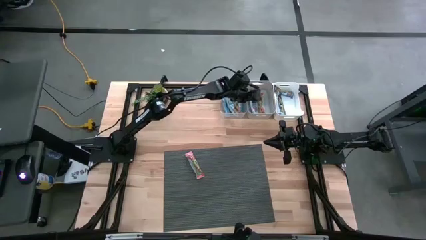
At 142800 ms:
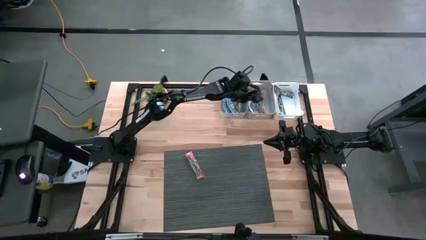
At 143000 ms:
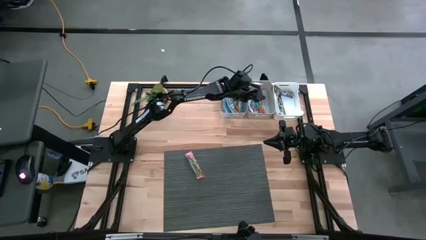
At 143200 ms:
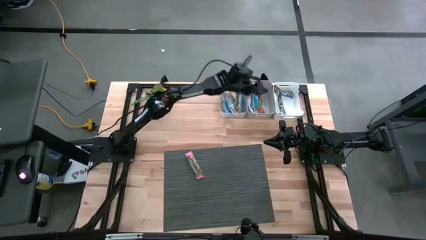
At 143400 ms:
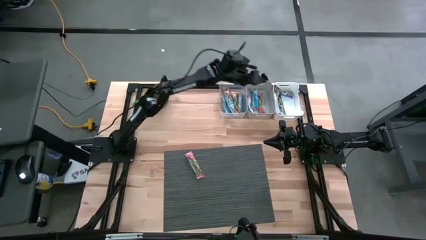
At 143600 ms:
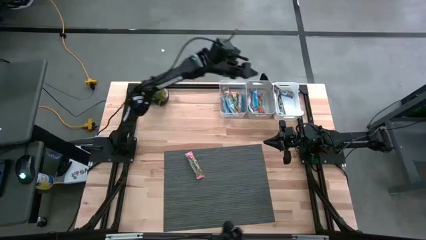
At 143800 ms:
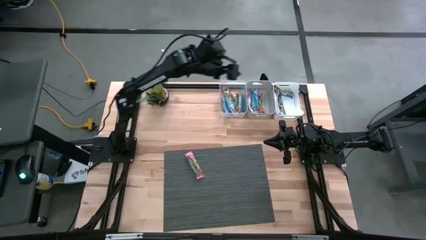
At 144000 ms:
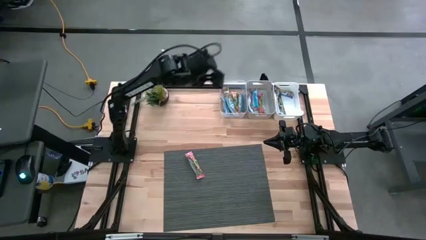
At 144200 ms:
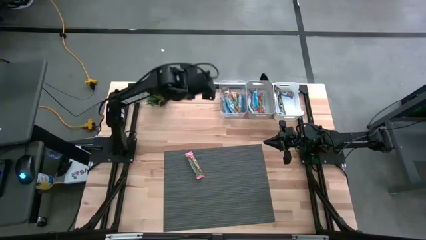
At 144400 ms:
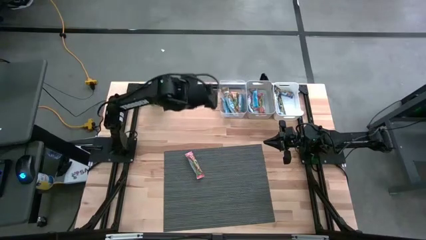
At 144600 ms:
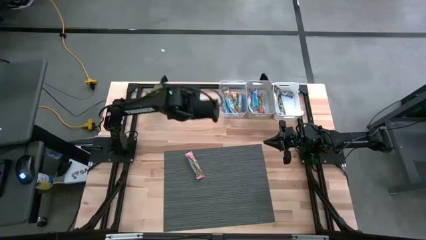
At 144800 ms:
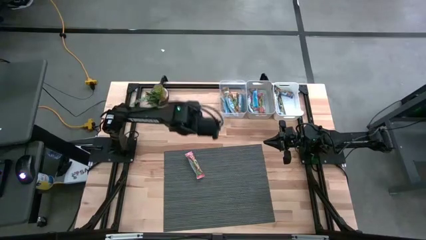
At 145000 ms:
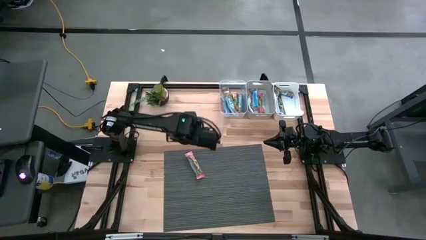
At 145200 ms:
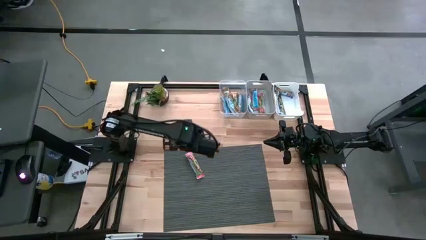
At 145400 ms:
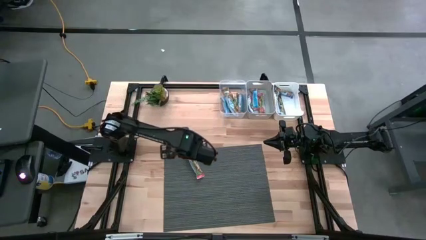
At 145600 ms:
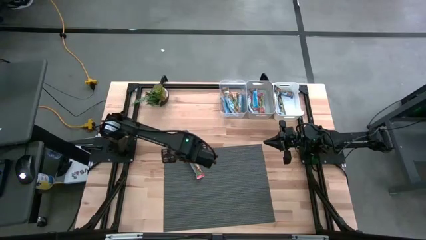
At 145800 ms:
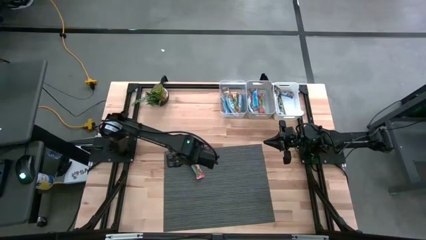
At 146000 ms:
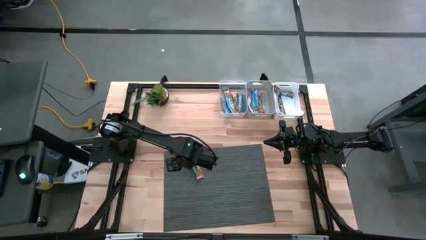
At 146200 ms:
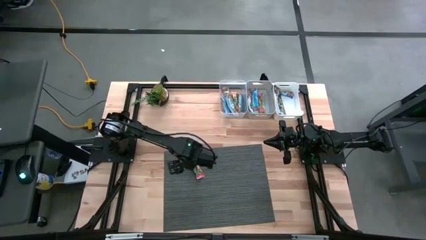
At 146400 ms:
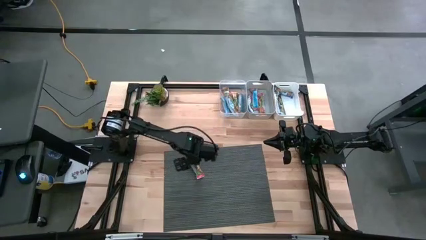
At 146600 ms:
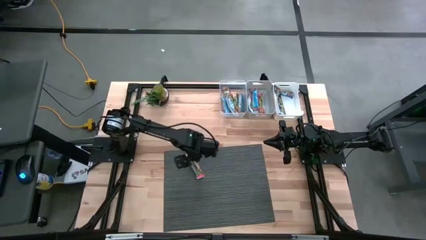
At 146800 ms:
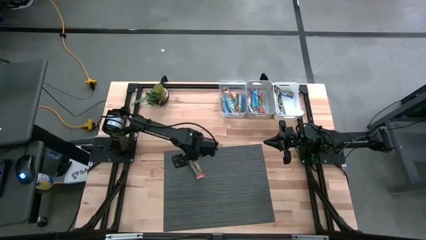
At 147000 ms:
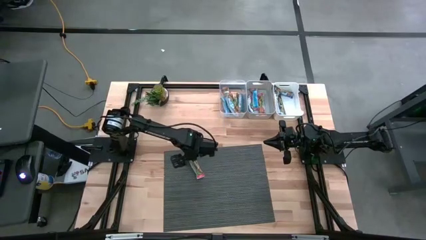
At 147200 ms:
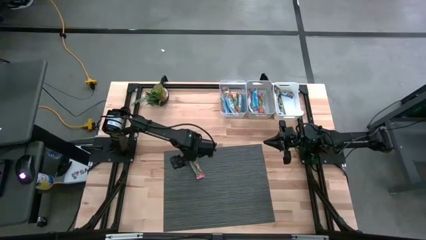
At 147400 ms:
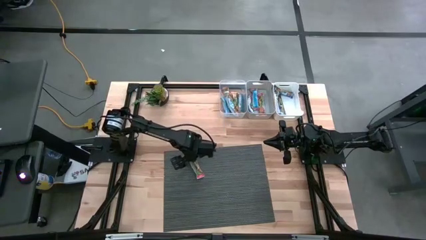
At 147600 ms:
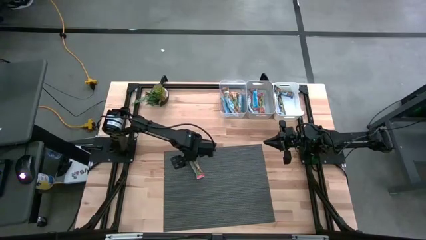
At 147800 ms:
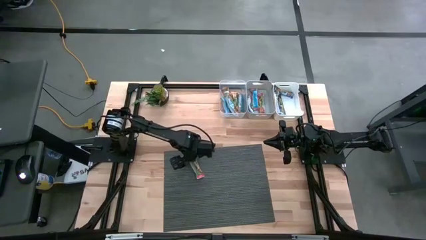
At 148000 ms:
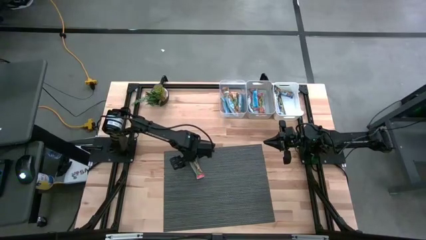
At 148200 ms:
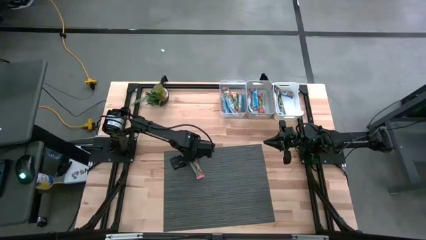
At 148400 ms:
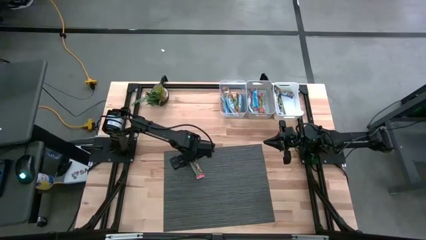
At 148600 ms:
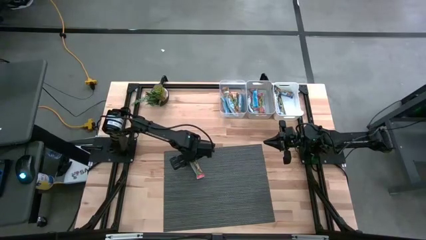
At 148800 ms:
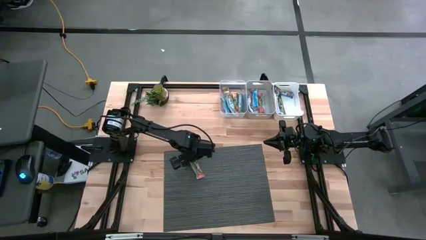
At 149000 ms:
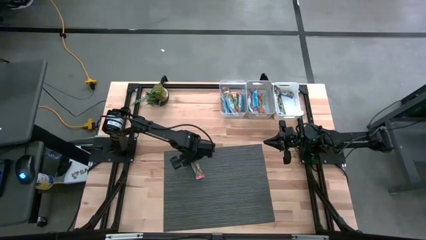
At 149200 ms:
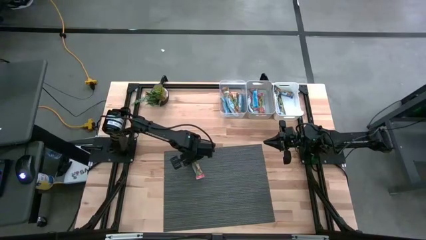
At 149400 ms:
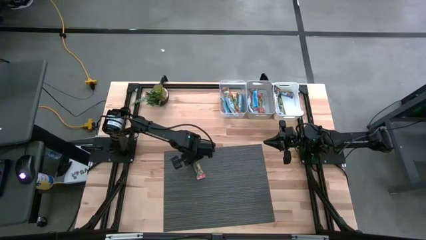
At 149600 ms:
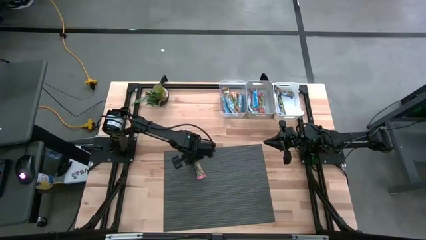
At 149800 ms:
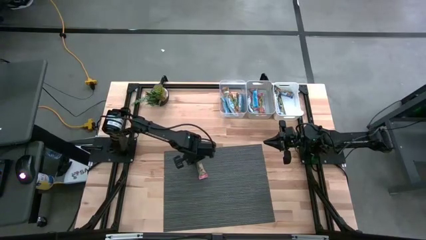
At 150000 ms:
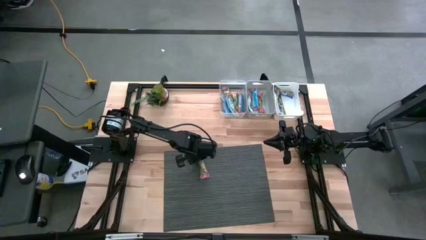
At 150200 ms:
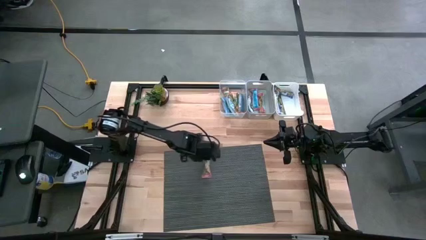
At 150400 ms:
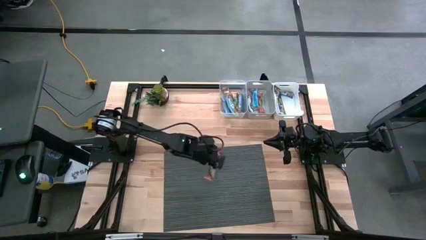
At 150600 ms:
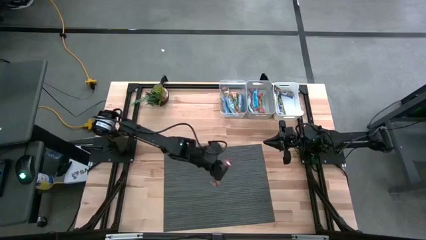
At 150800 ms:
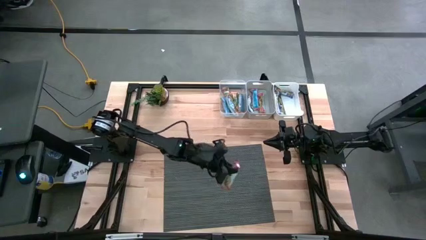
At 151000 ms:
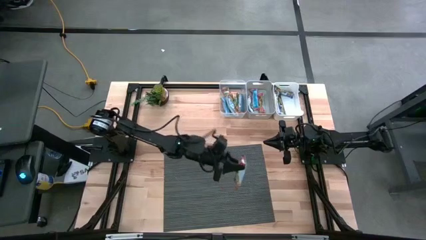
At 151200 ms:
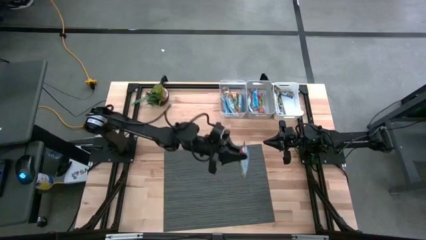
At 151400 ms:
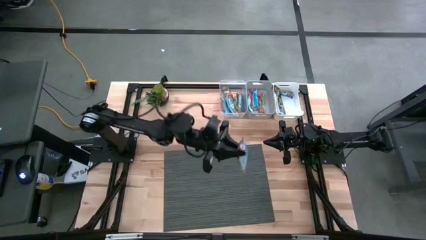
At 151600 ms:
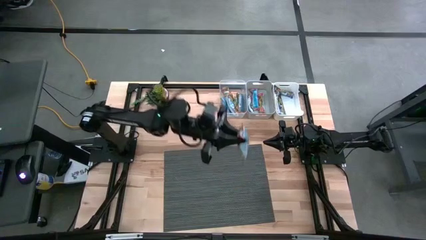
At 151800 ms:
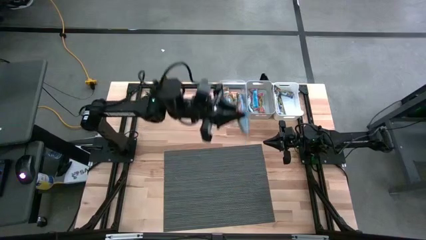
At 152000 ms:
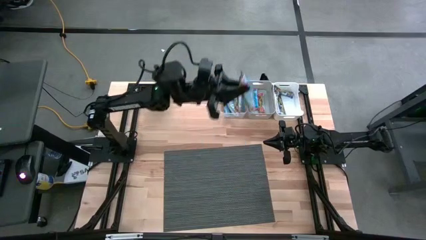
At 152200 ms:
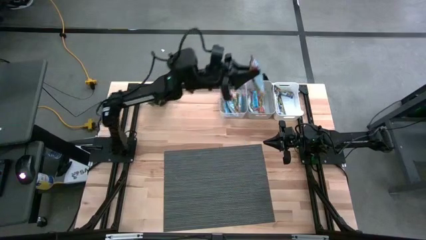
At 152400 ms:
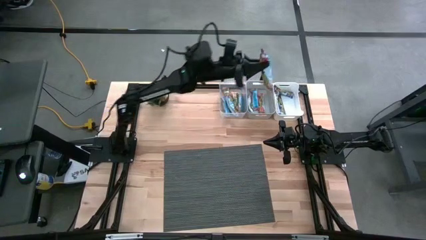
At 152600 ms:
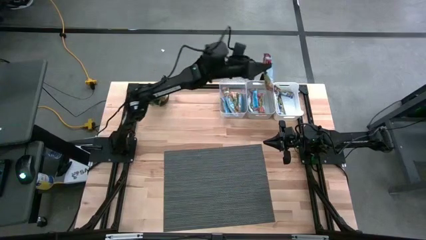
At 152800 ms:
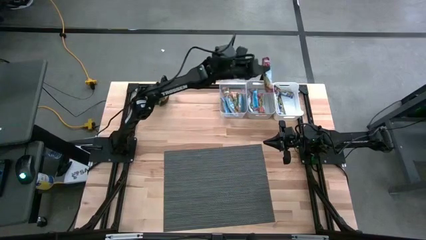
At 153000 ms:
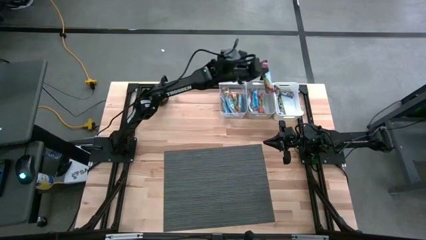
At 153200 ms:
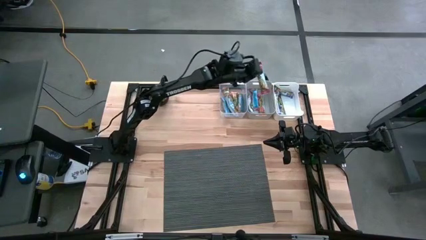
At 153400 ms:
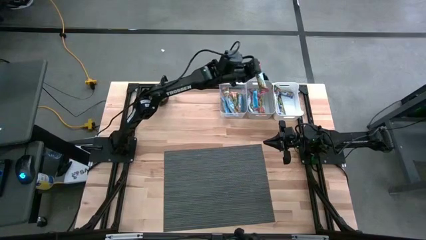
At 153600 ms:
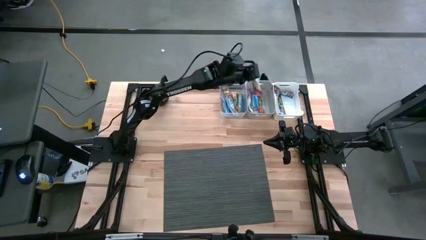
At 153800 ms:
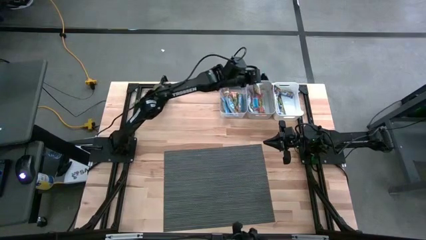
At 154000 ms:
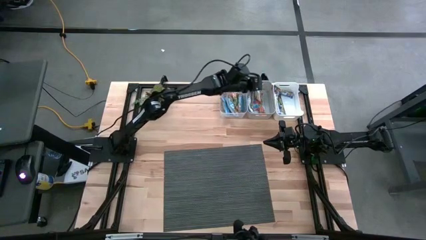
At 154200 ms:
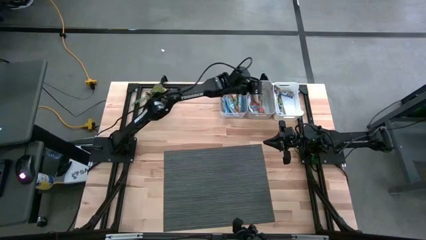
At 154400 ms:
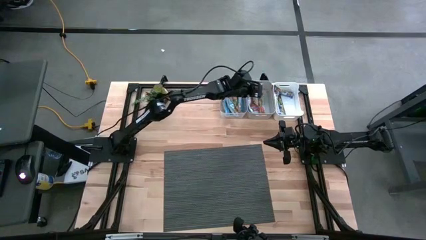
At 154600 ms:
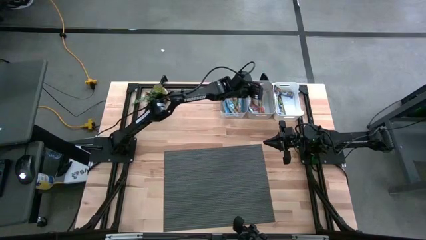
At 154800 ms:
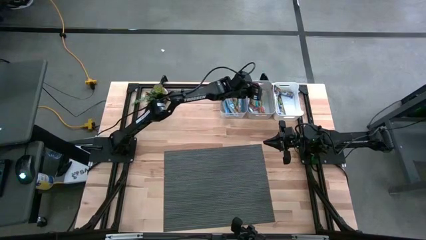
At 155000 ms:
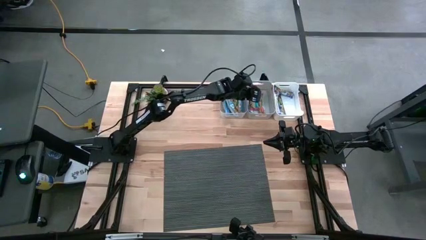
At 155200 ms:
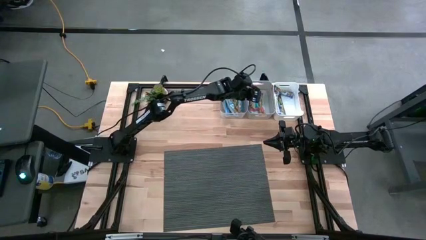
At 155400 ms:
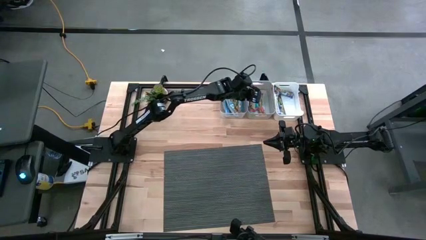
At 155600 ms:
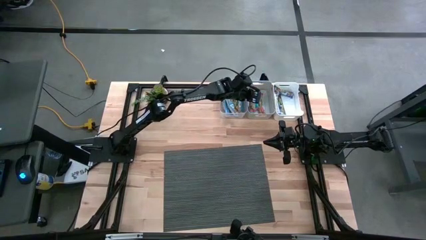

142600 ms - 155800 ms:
Task: Pick and place Granola Bars by type
Put the red granola bar into the gray bin

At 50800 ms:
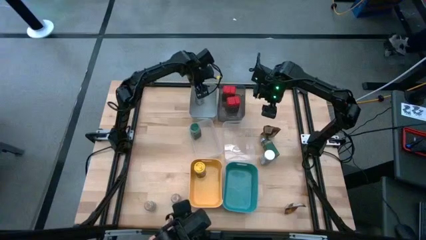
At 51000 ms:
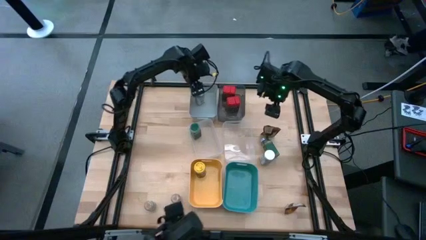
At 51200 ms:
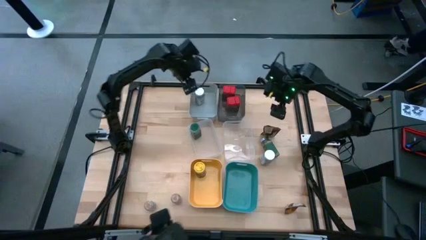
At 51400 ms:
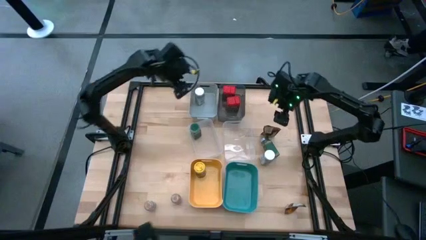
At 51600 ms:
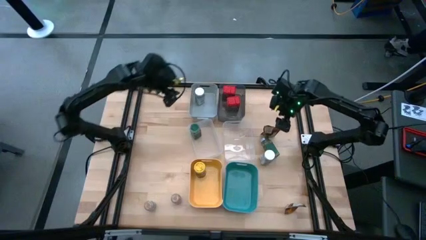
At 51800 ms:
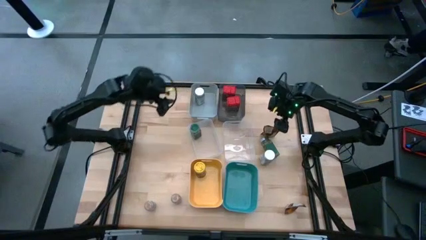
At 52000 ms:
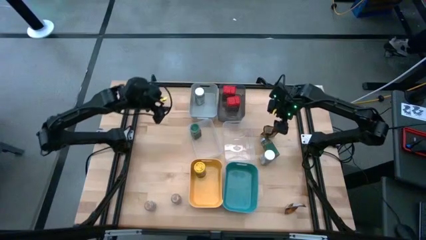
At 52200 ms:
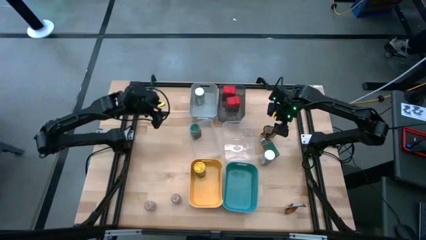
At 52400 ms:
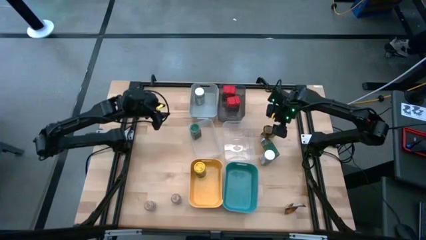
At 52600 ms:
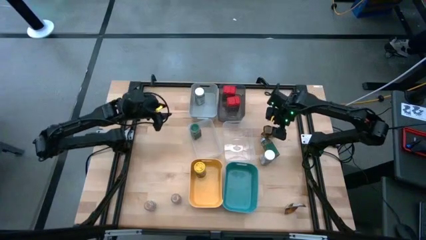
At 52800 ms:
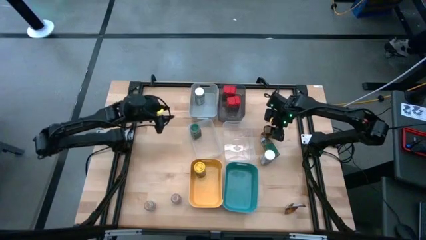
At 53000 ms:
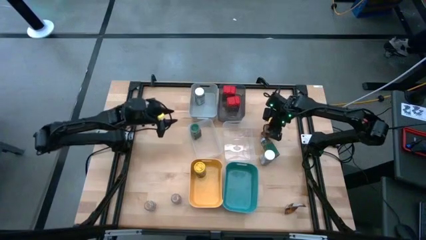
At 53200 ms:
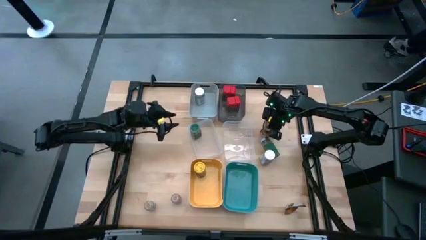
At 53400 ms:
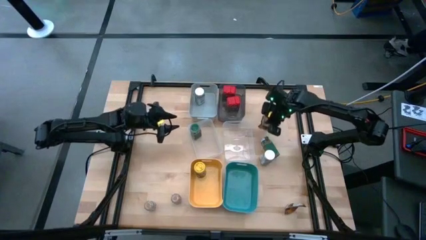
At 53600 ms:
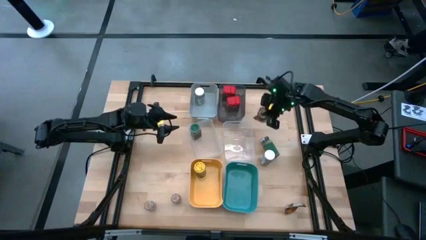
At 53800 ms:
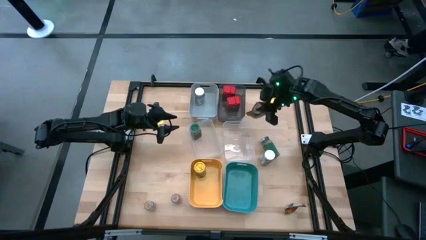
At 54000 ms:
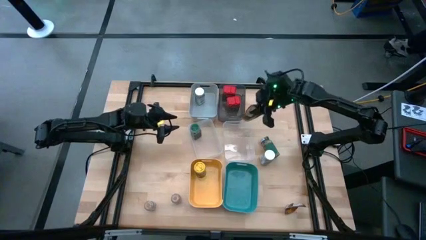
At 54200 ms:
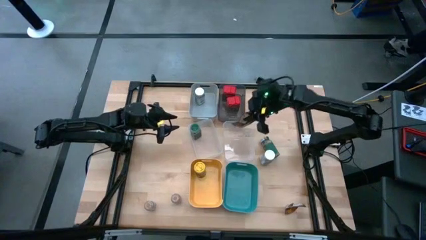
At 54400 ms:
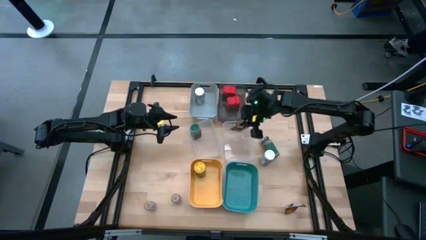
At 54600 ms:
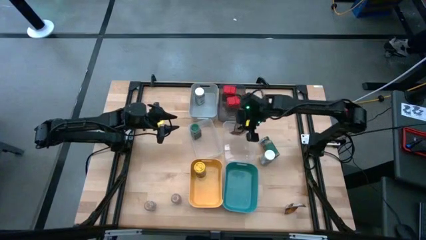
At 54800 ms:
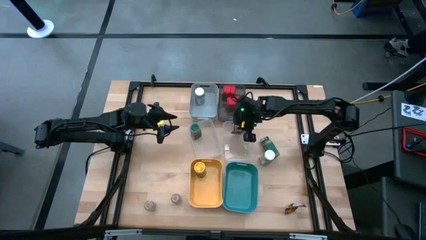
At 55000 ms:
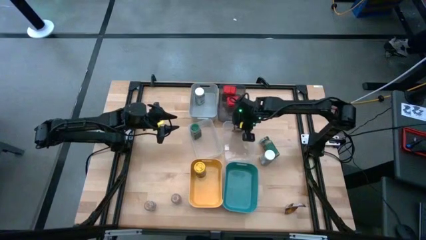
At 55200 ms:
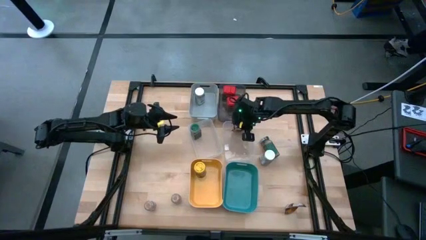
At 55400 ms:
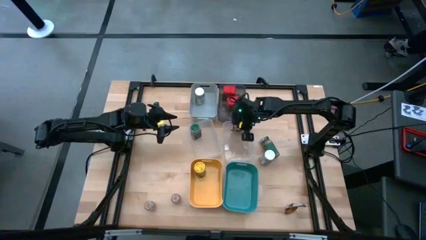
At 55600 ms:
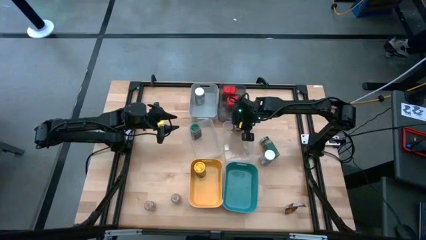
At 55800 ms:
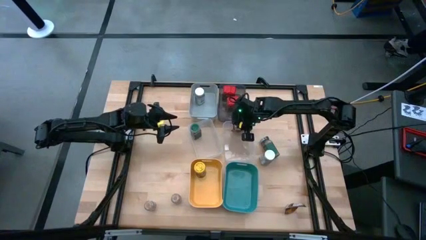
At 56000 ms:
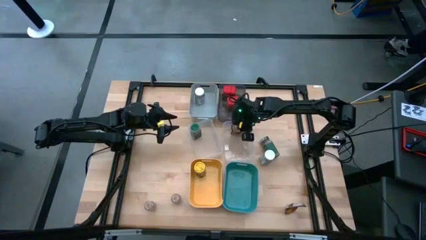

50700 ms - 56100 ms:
Task: Sort spices by type
Put the top orange seasoning pack into the right transparent bin
